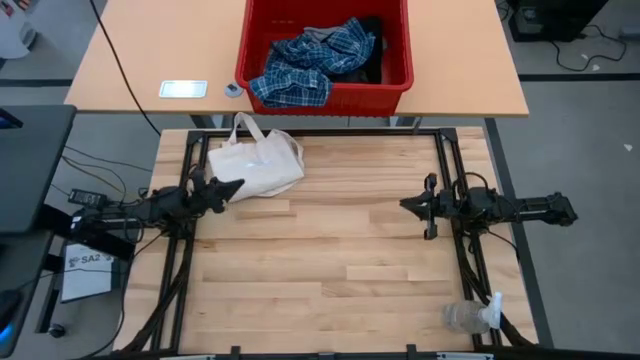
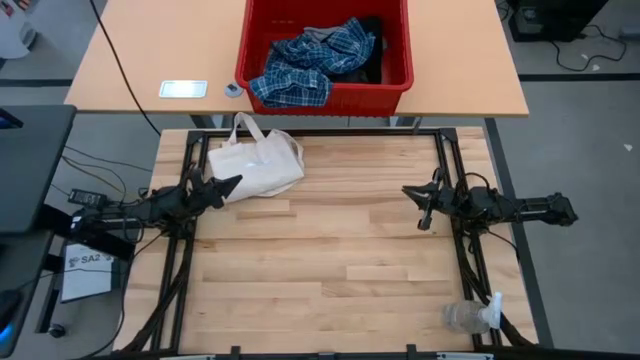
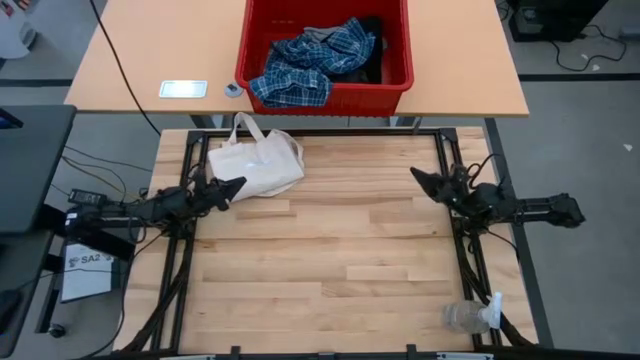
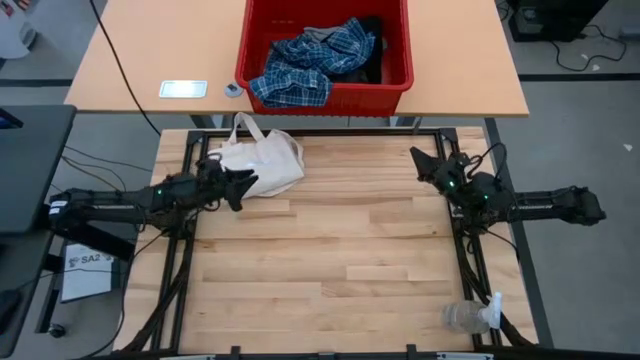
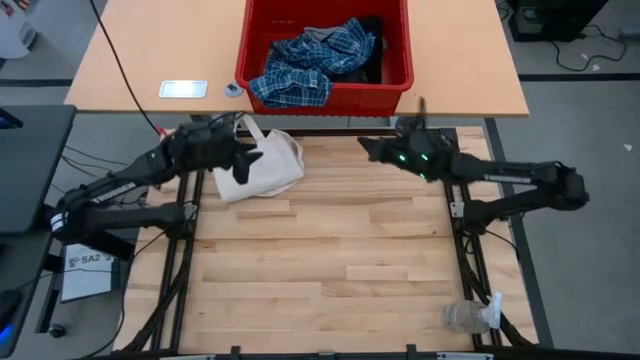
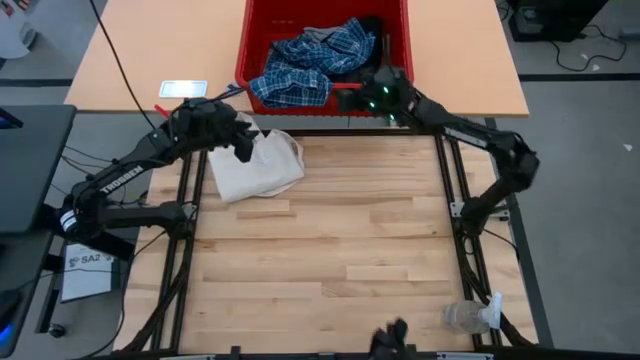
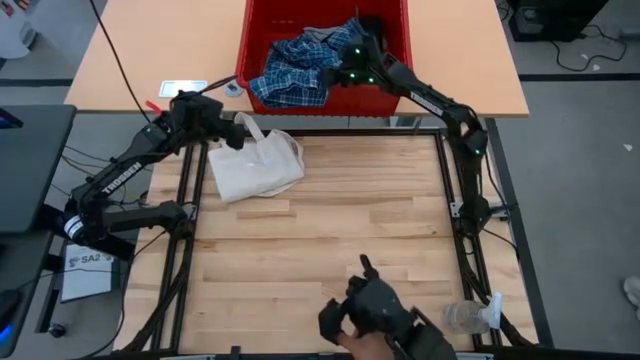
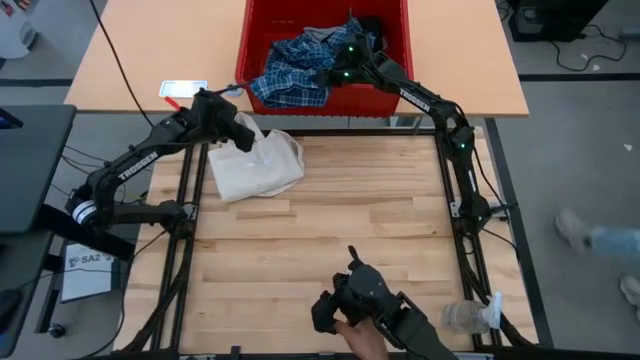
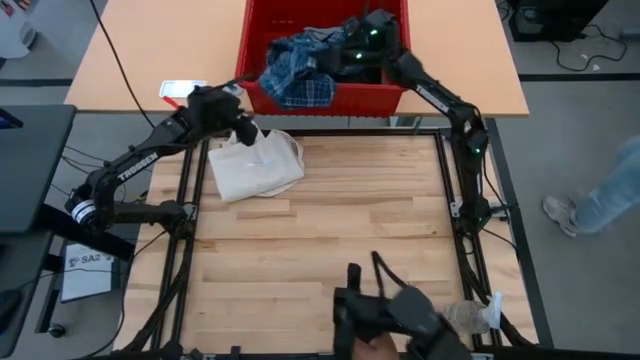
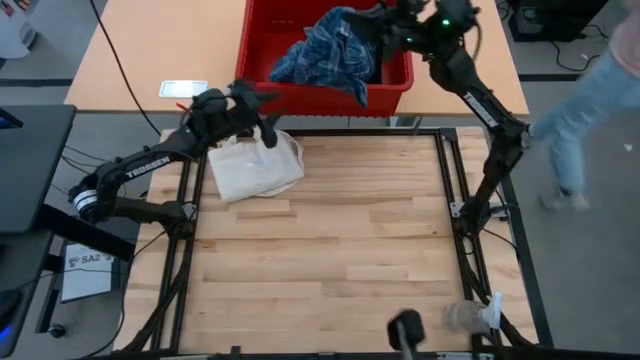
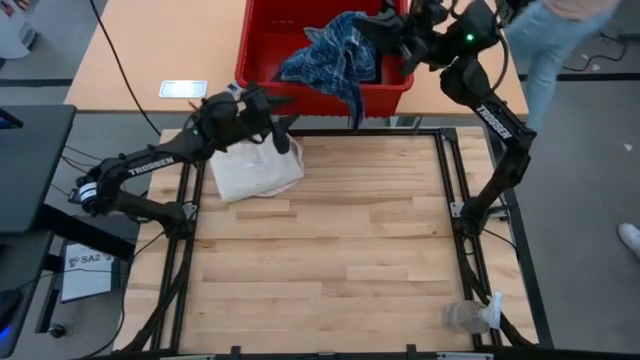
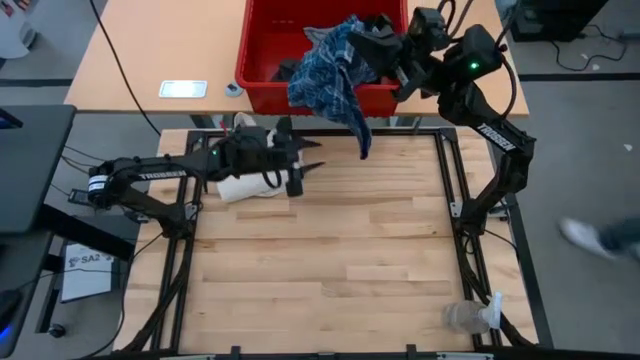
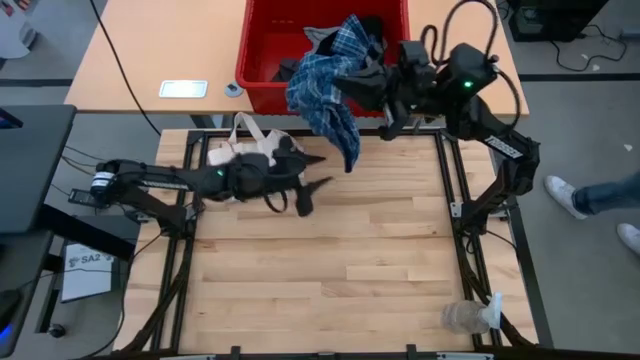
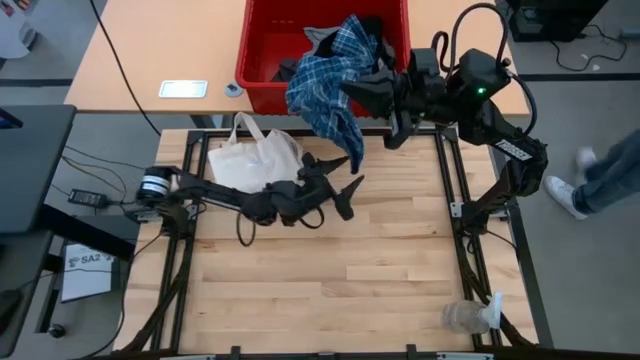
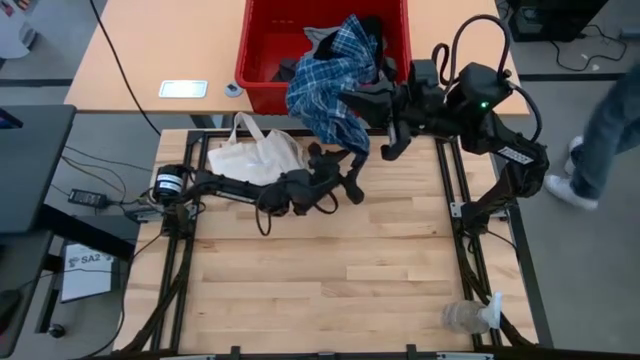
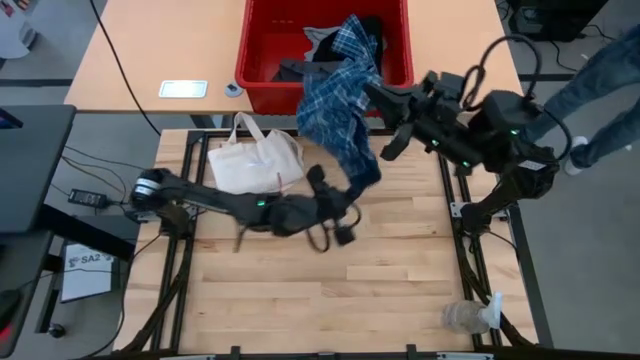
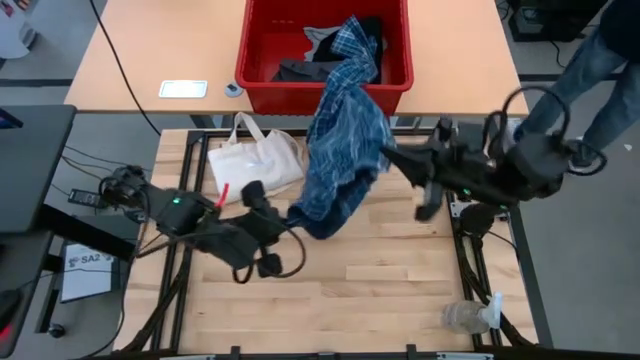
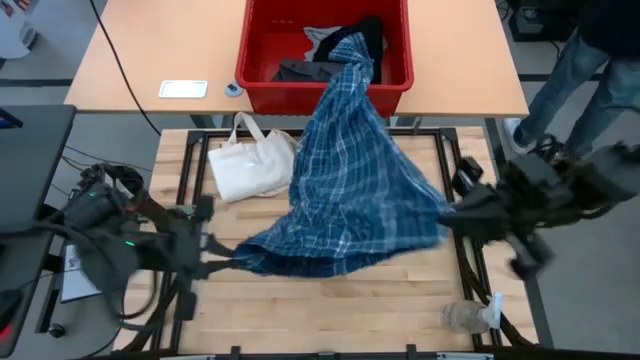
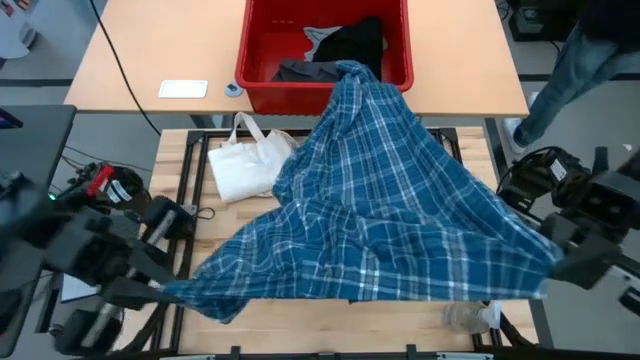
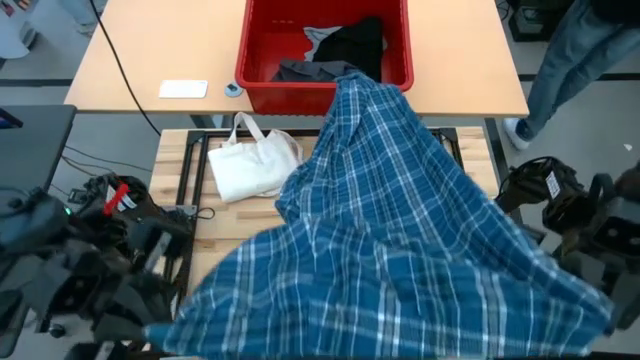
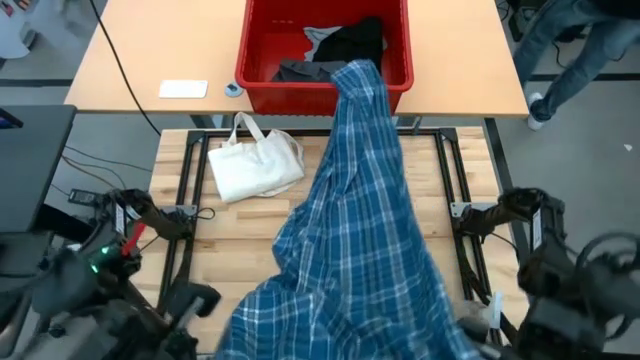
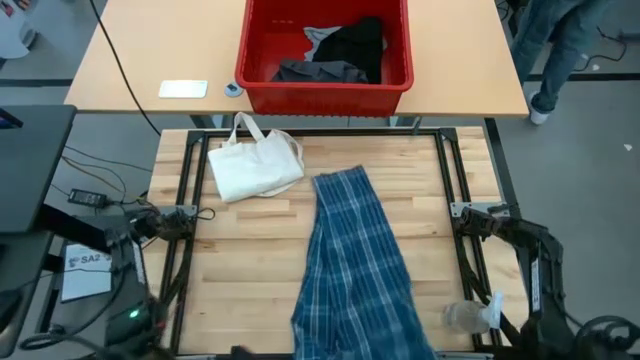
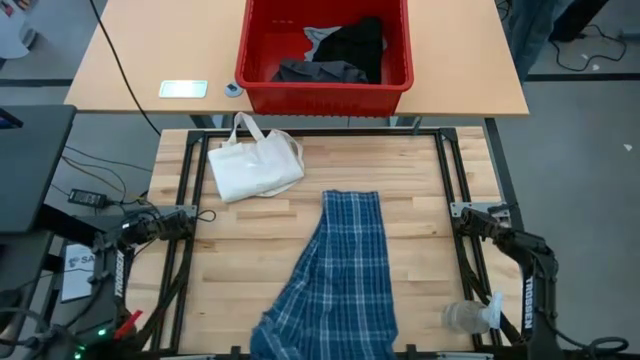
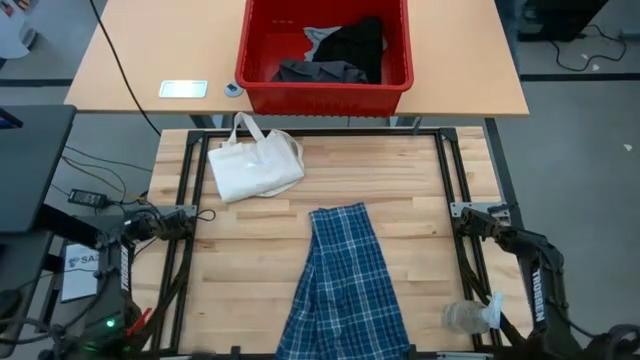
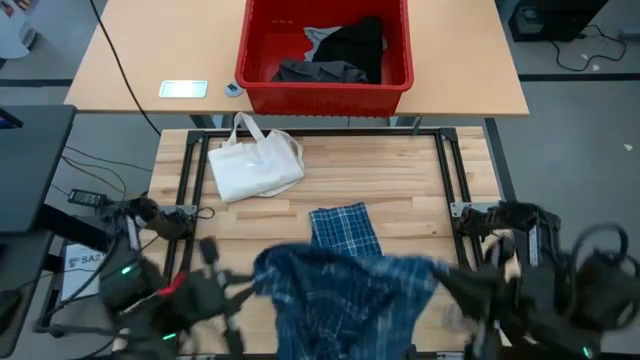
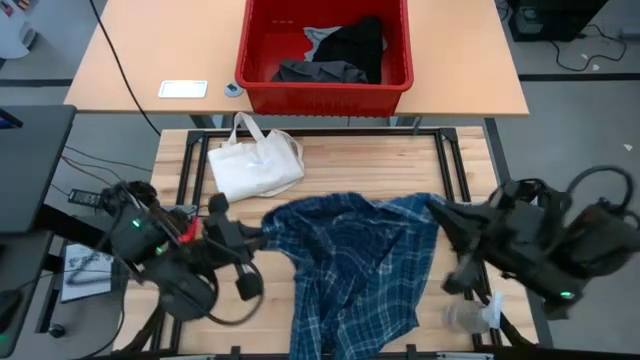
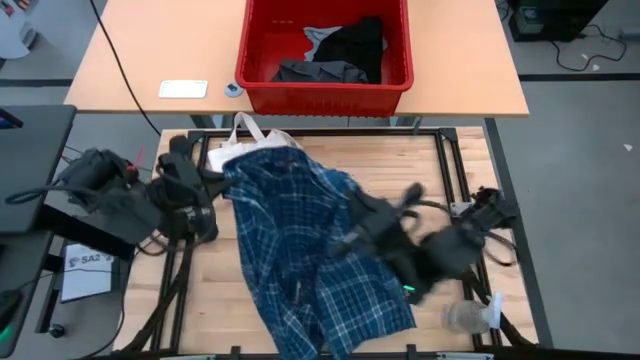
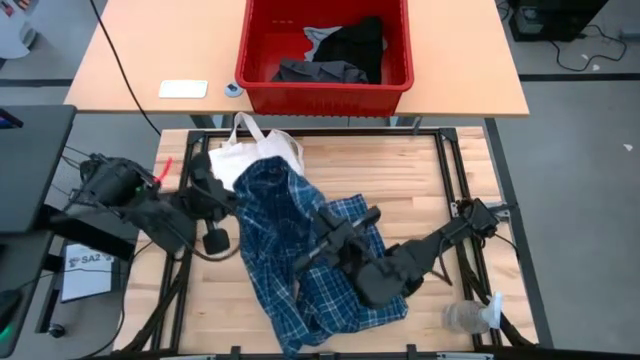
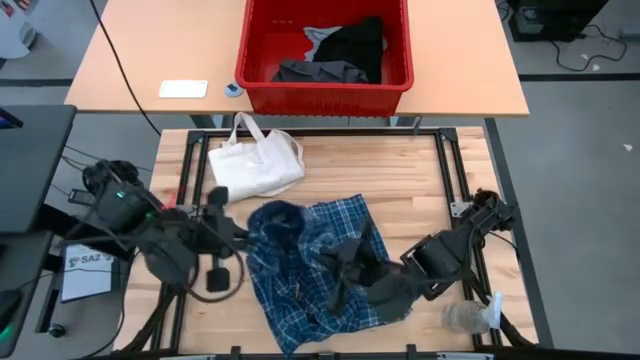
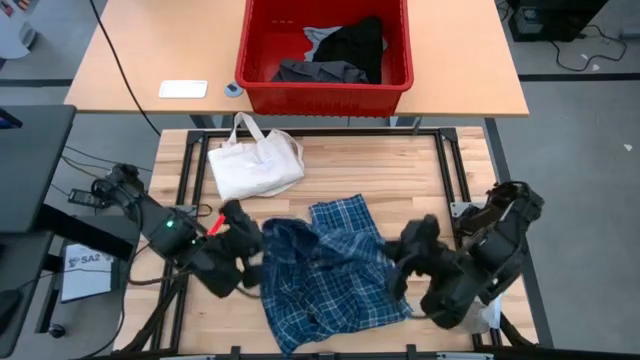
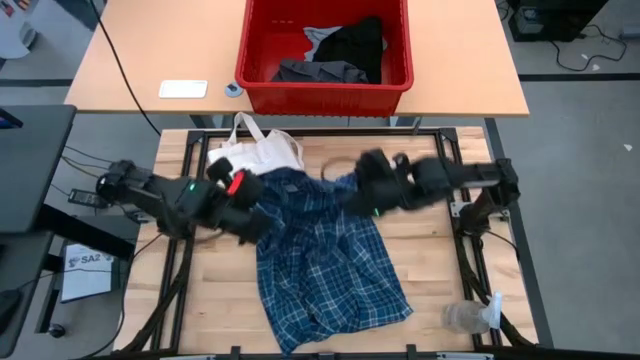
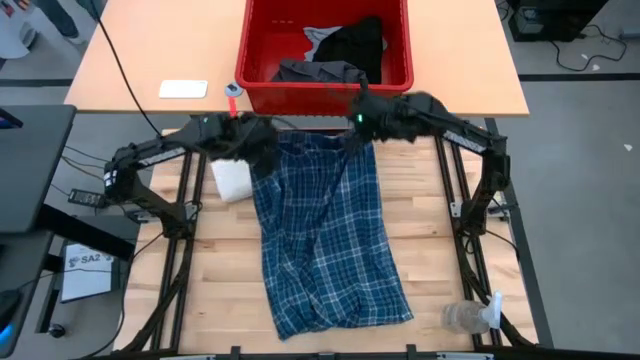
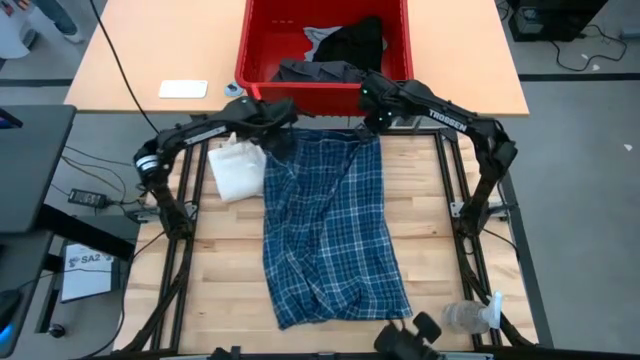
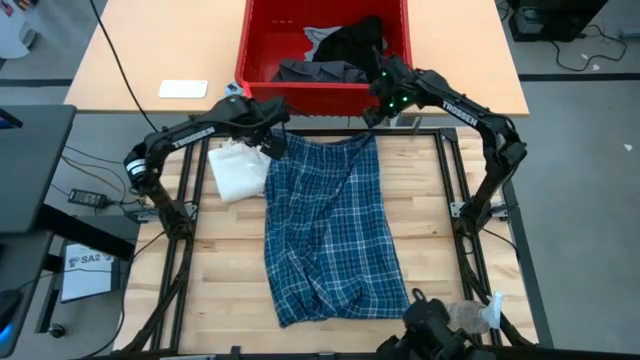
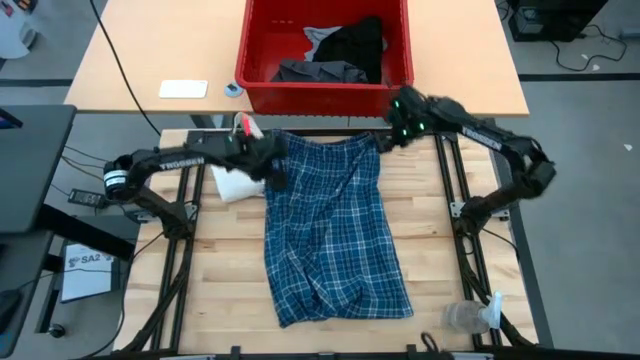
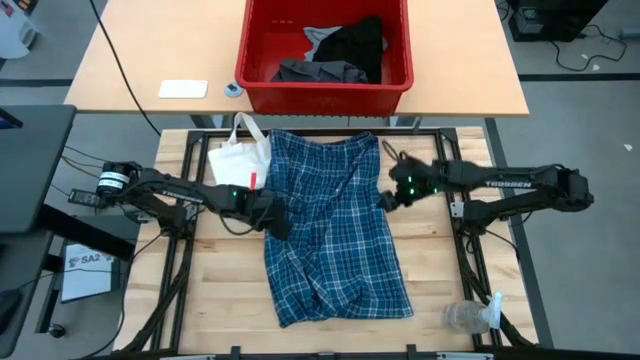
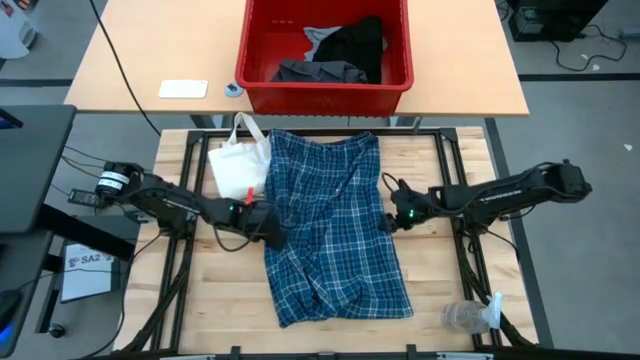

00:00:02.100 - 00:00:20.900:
Task: Fold laundry
Fold the blue pants
